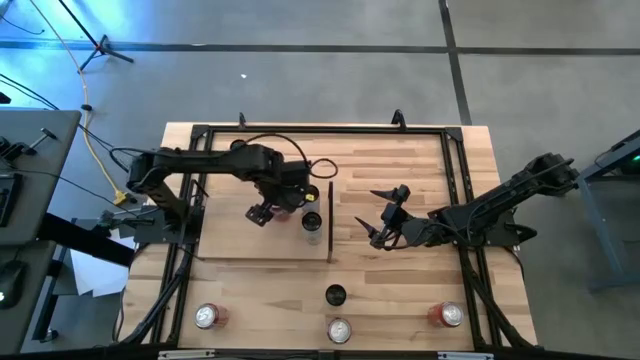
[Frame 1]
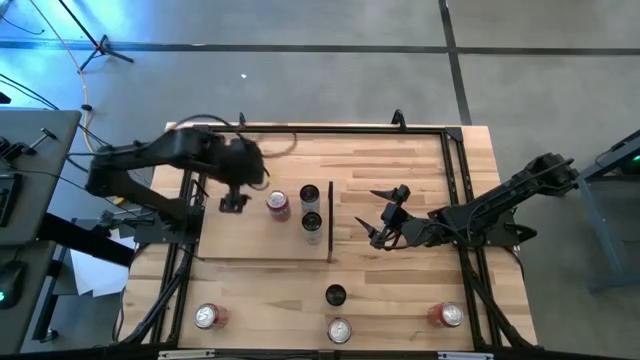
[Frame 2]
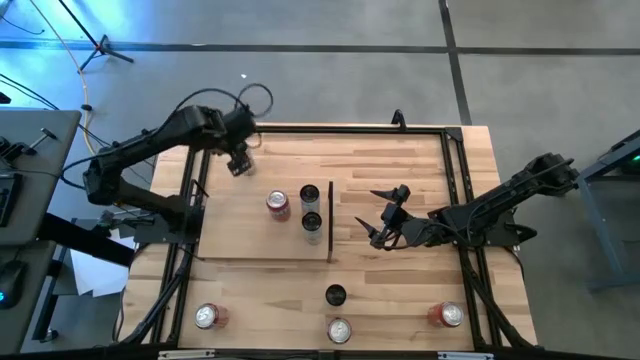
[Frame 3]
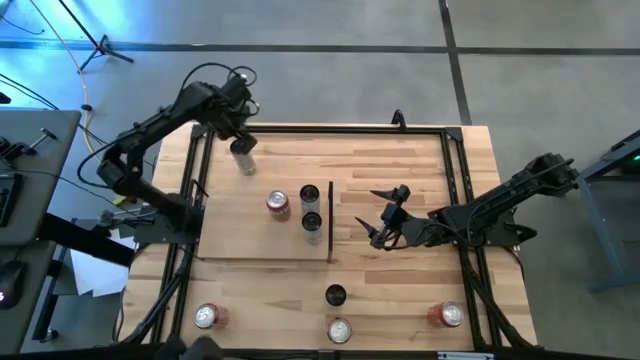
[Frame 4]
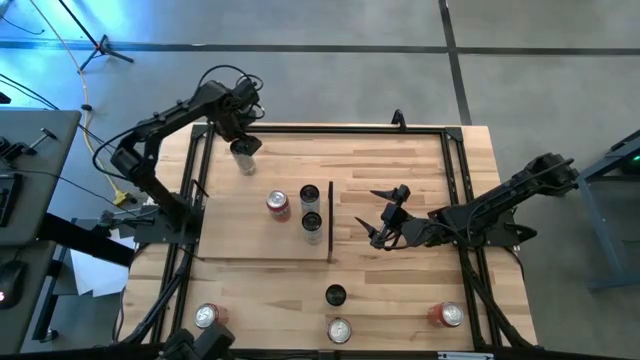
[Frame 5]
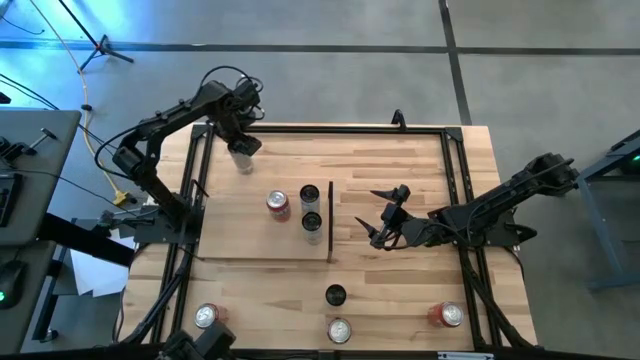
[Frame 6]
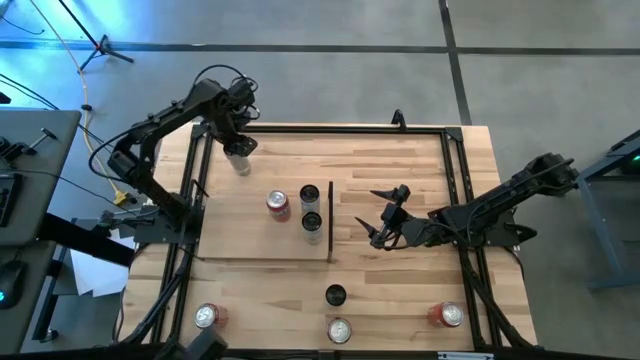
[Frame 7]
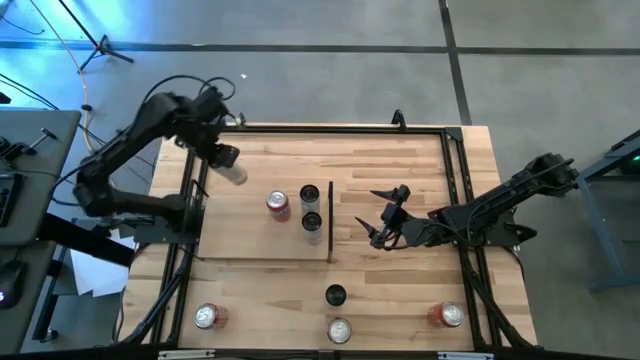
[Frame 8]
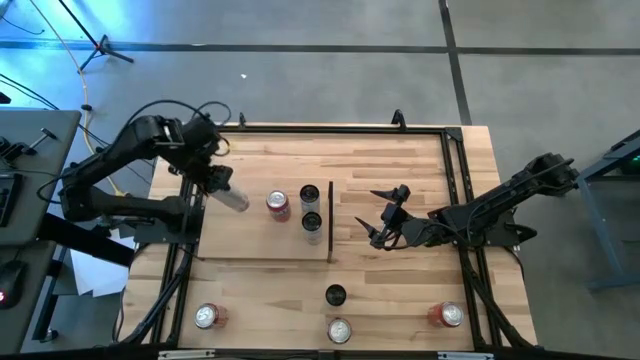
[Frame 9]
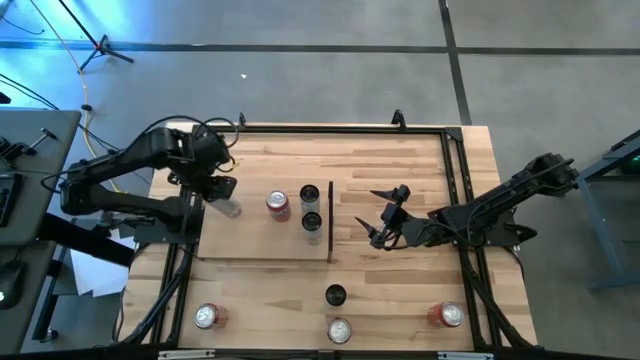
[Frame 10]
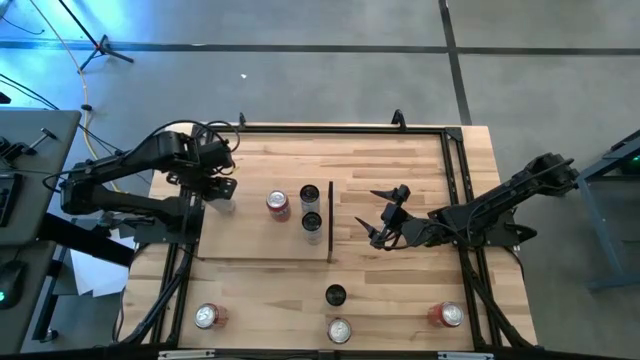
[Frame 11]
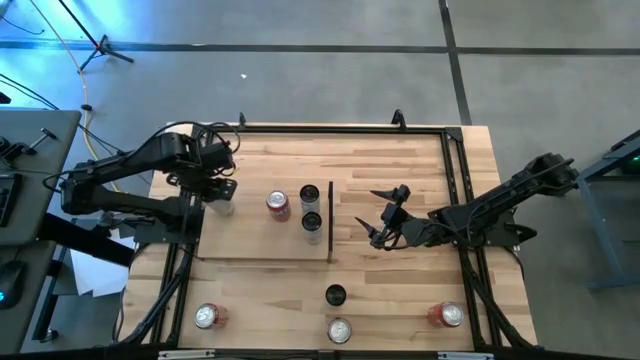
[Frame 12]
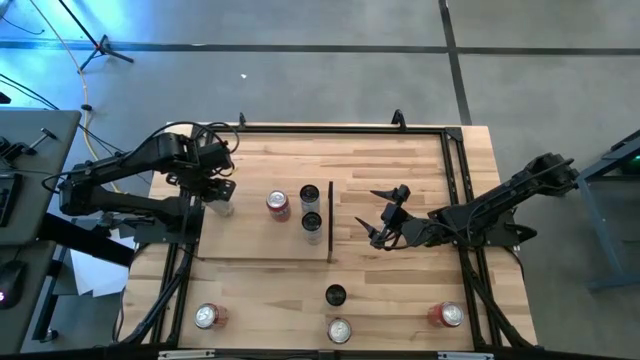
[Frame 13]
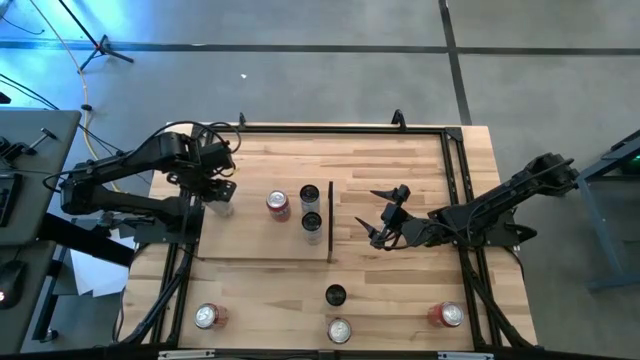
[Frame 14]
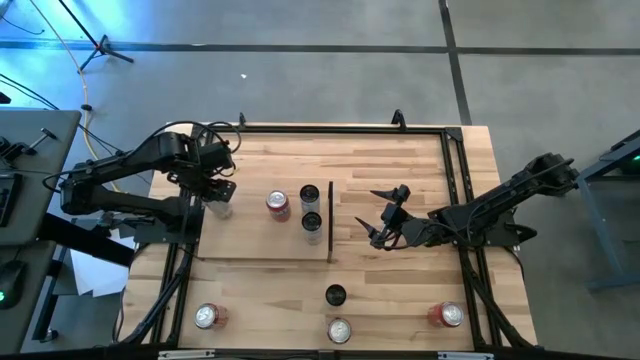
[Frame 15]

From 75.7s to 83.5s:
Task: Place canned beverage on shelf
Put the top white yellow soda can on the shelf

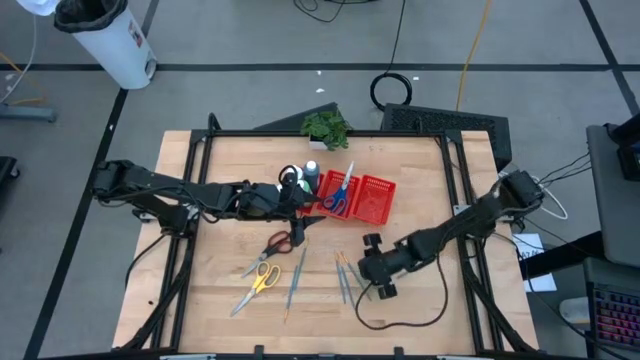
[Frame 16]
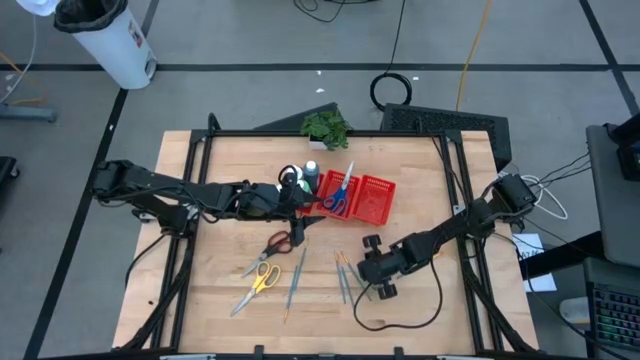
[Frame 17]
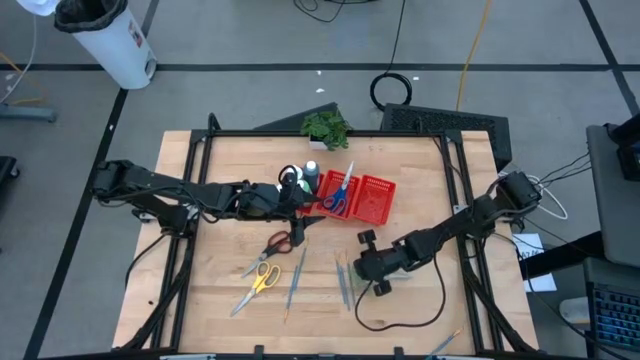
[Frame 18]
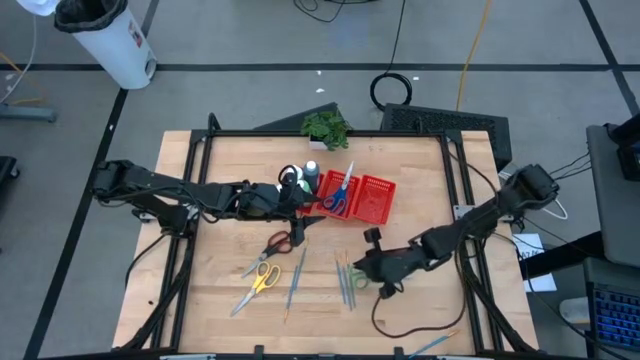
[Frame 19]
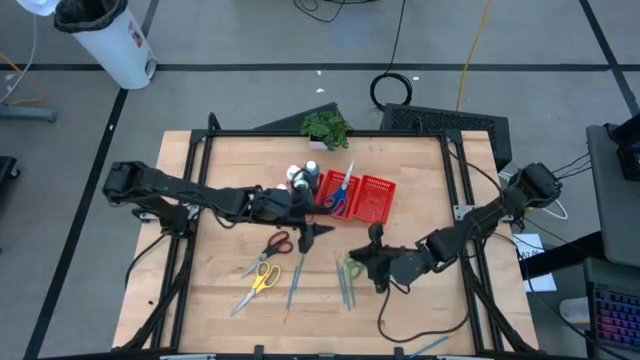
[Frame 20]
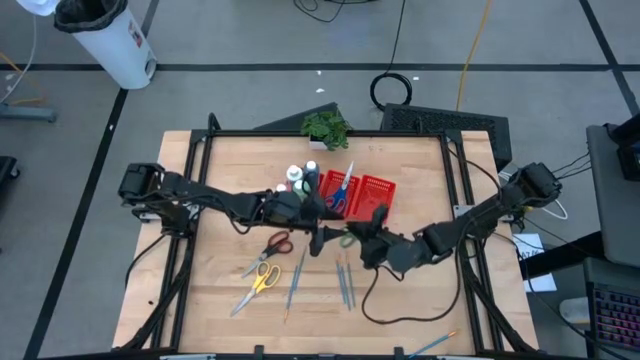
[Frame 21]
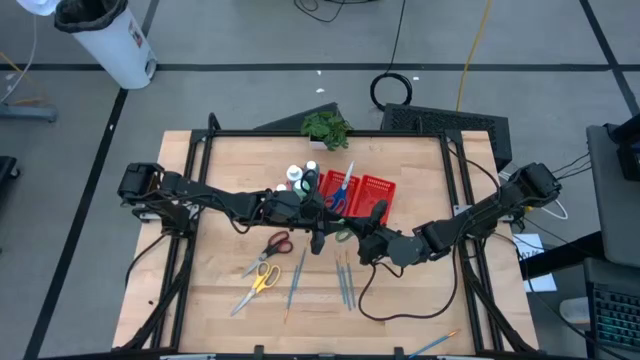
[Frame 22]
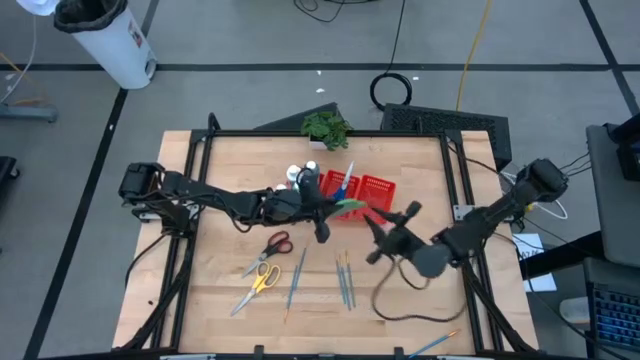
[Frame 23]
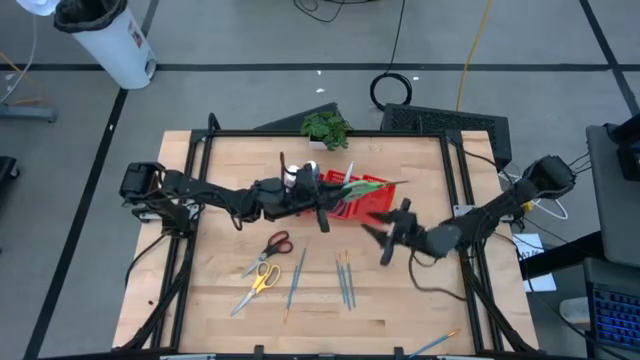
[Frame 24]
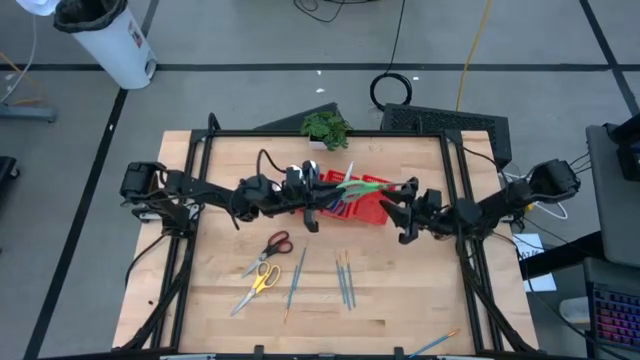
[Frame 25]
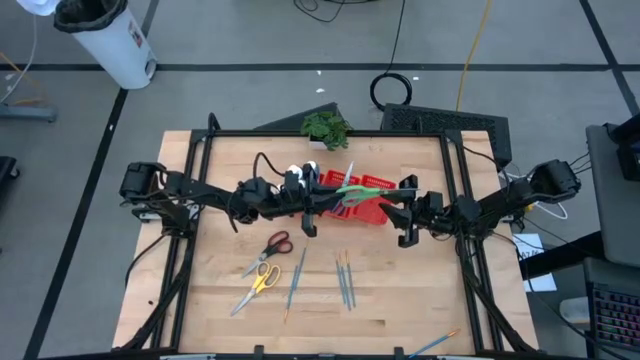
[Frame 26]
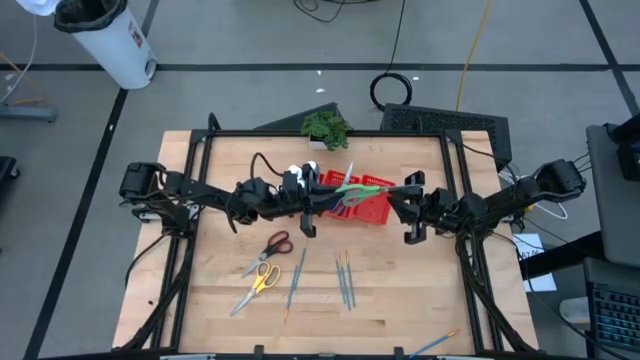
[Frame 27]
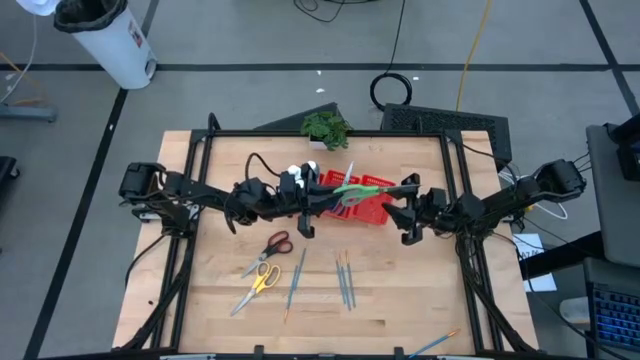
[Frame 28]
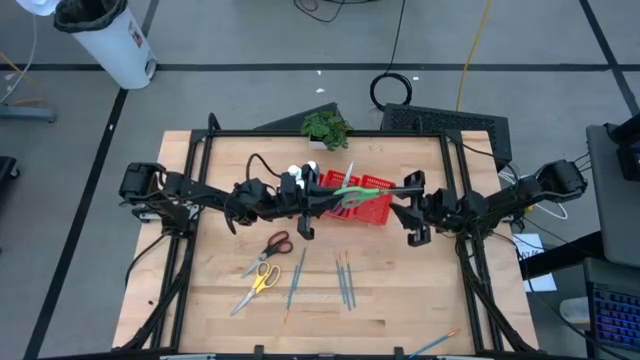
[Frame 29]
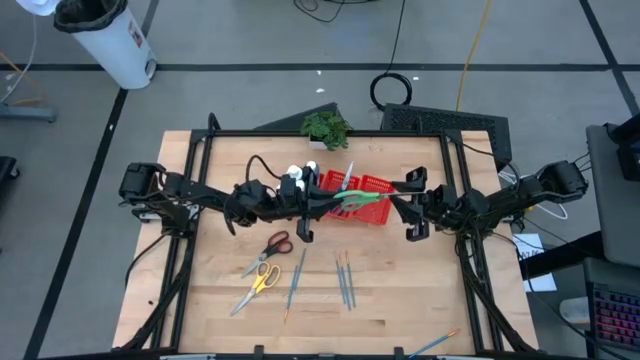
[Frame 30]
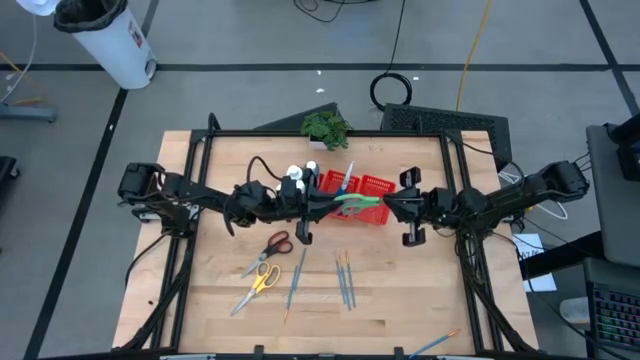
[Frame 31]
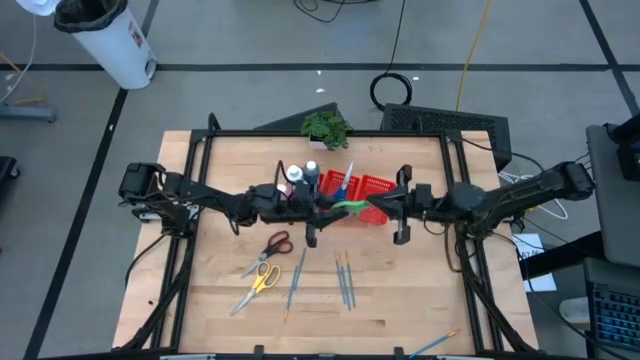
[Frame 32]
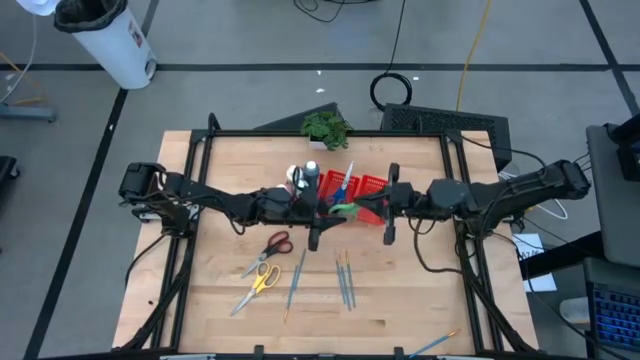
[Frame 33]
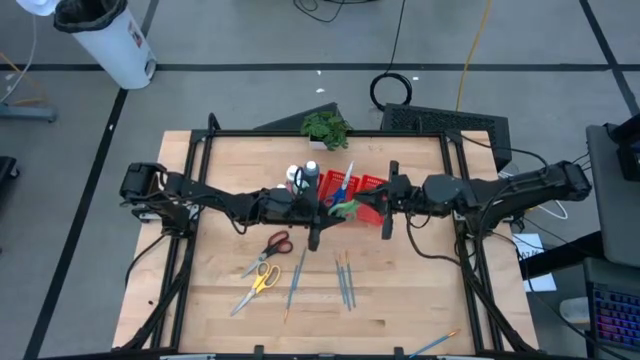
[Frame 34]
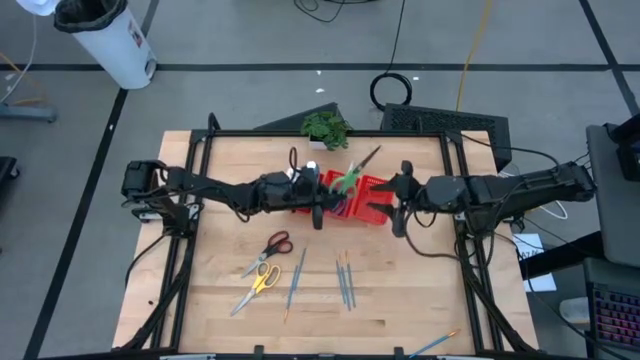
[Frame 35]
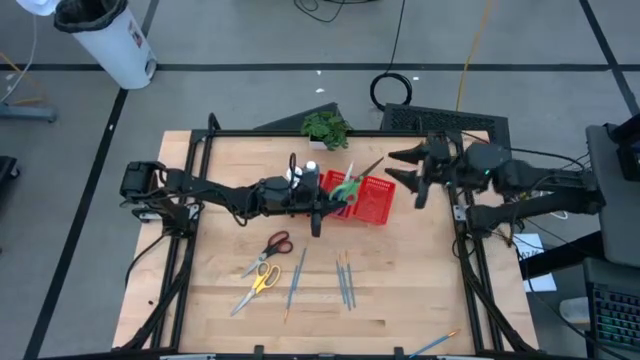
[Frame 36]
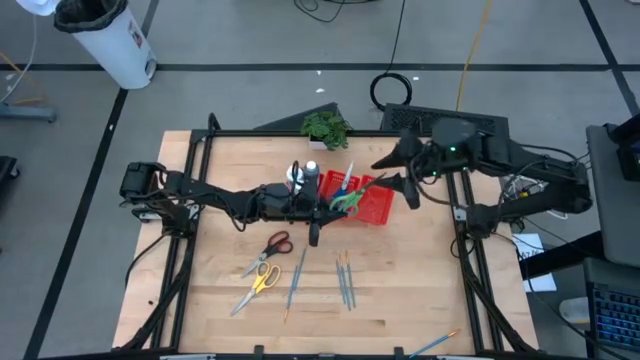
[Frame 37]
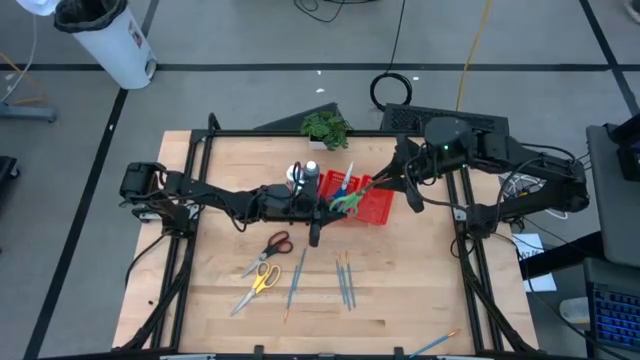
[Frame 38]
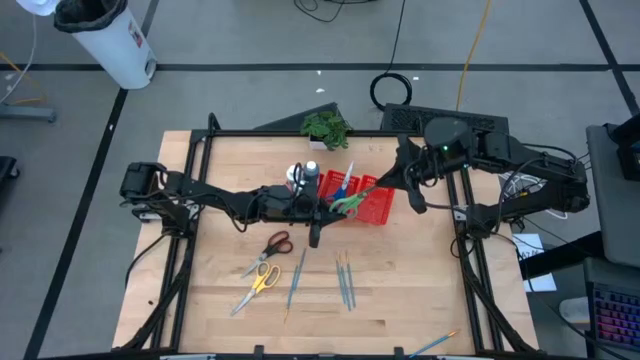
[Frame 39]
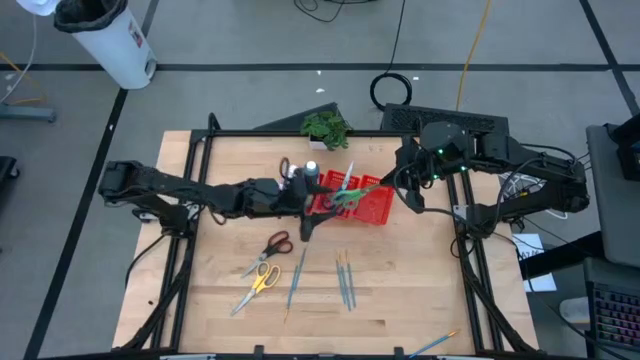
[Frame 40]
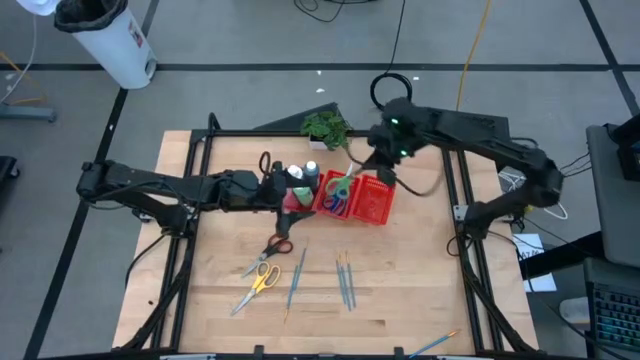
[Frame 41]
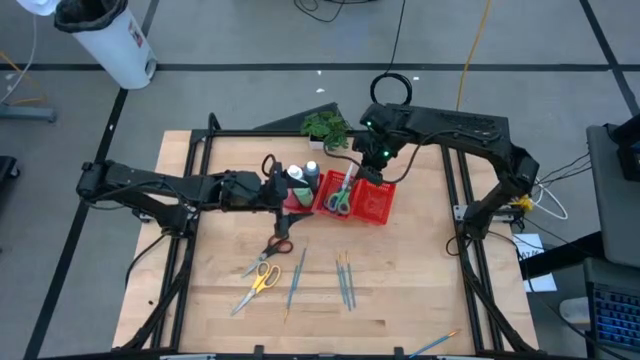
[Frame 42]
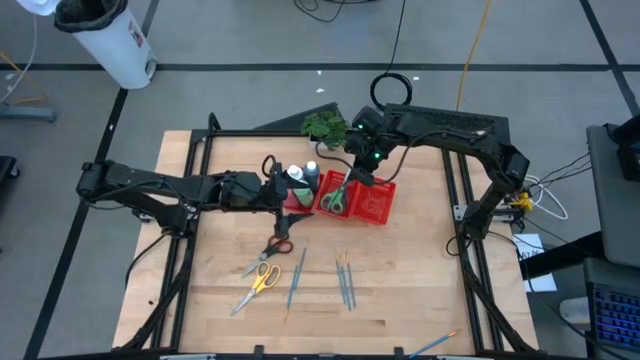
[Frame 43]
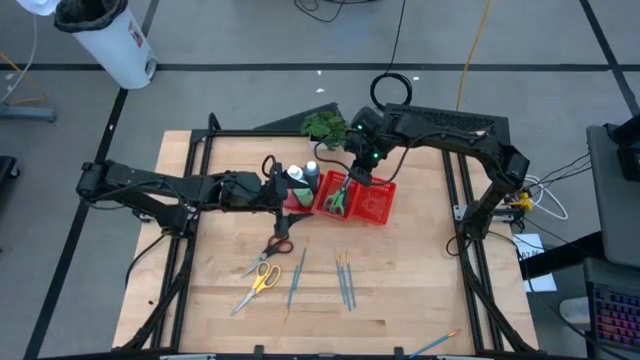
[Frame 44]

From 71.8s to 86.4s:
Task: Pick & Place Paint Supplies
Put the green scissors into the middle red bin
